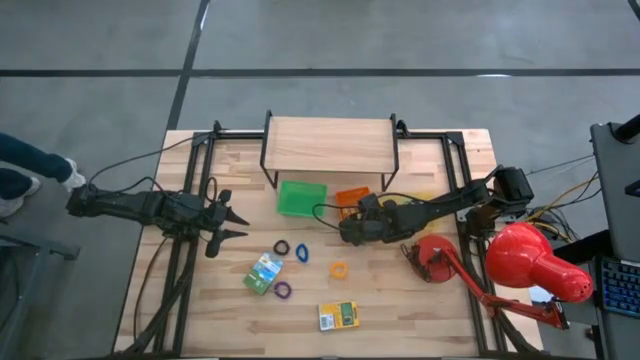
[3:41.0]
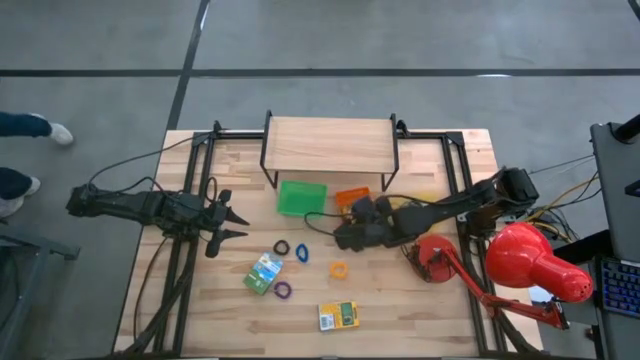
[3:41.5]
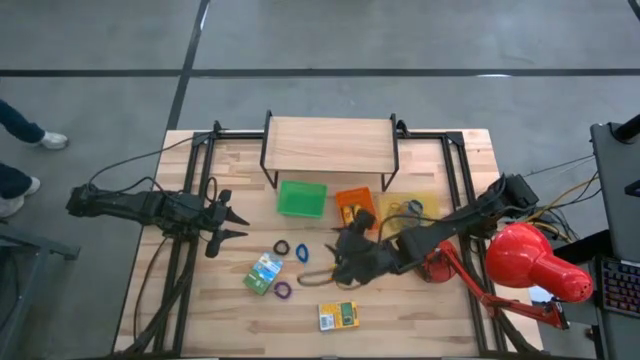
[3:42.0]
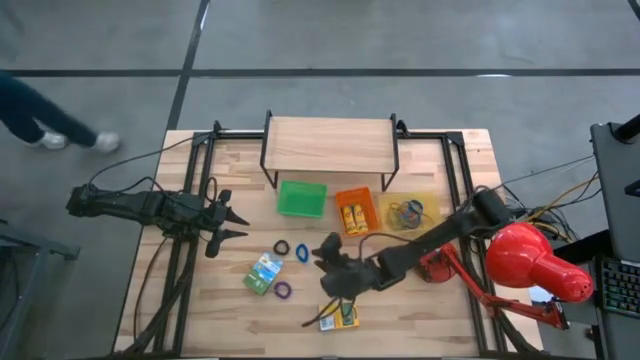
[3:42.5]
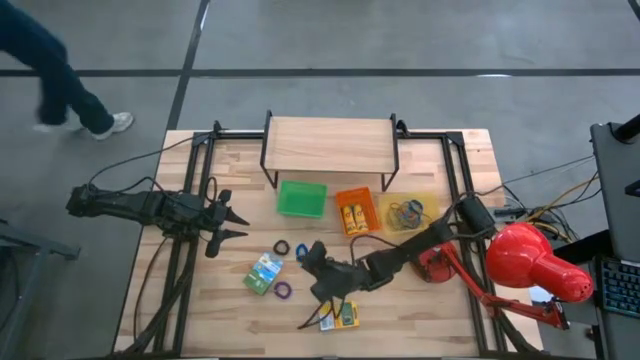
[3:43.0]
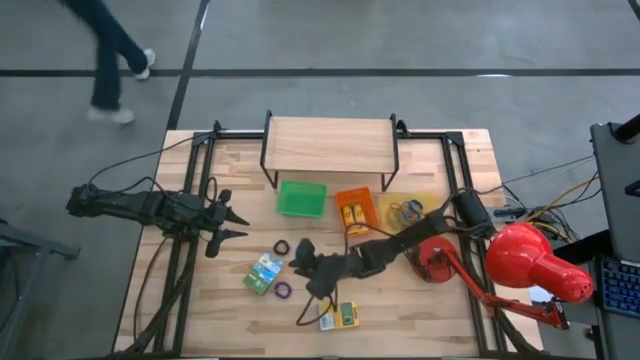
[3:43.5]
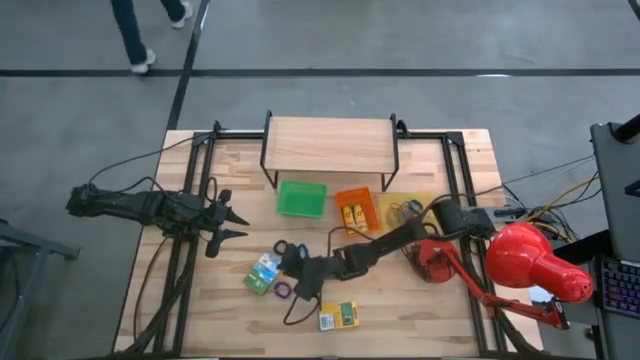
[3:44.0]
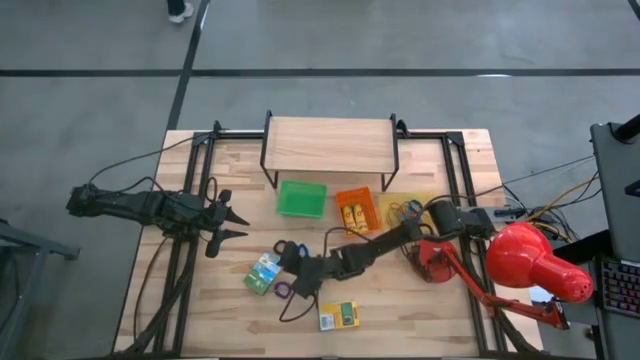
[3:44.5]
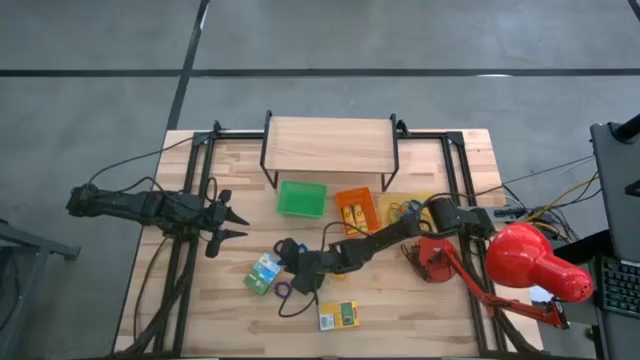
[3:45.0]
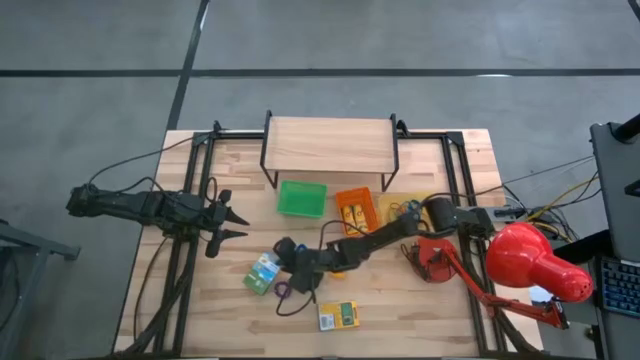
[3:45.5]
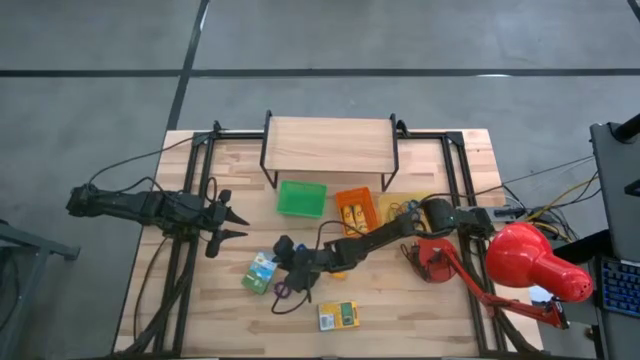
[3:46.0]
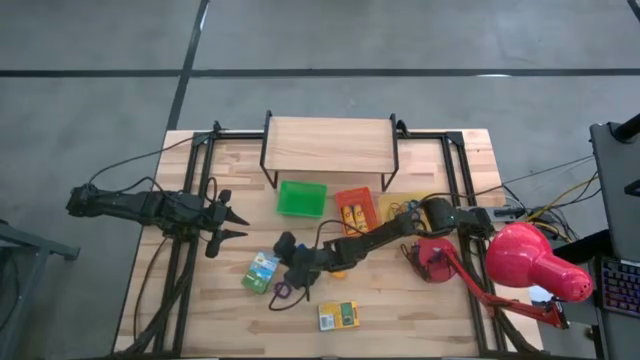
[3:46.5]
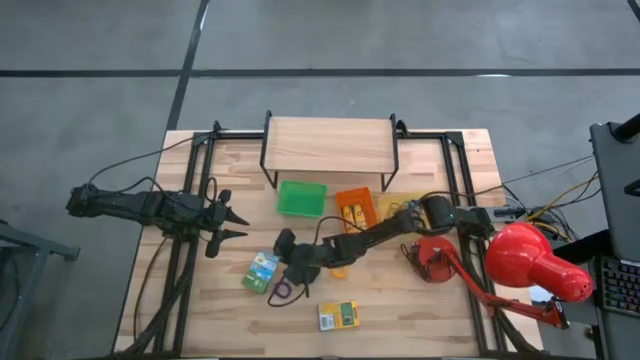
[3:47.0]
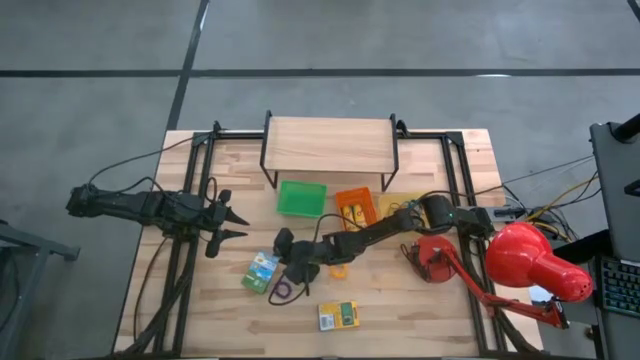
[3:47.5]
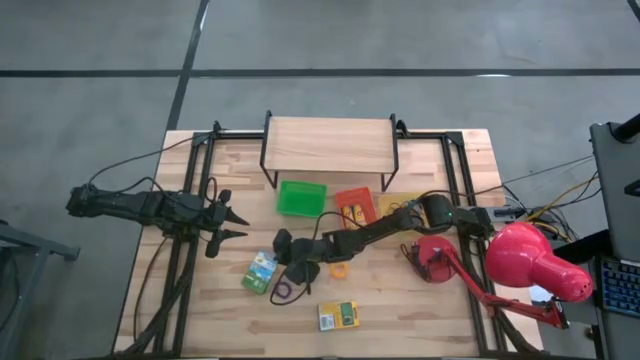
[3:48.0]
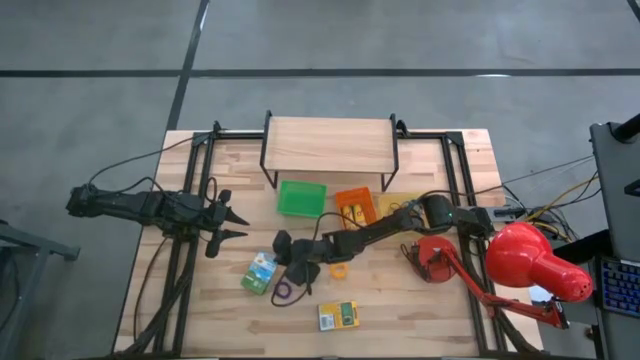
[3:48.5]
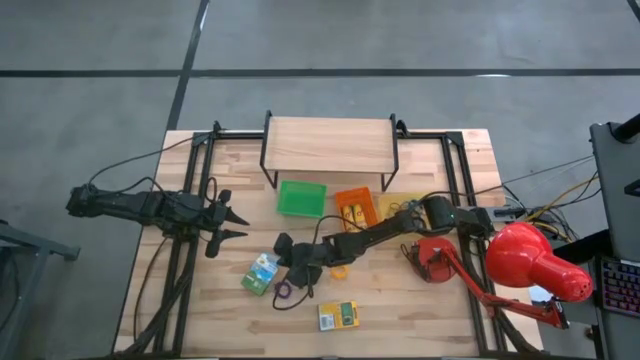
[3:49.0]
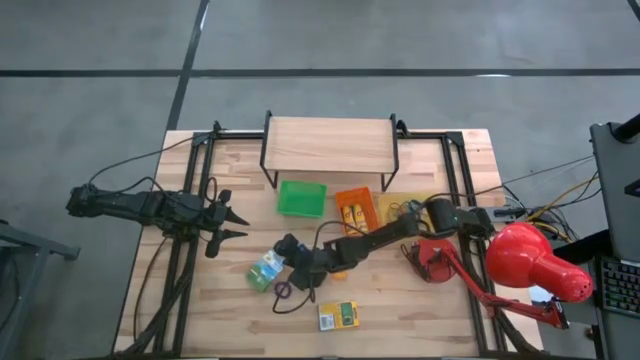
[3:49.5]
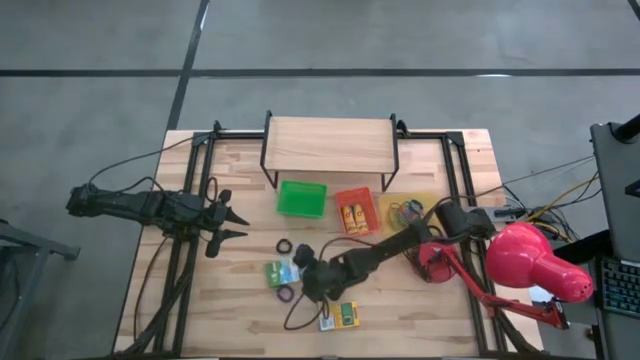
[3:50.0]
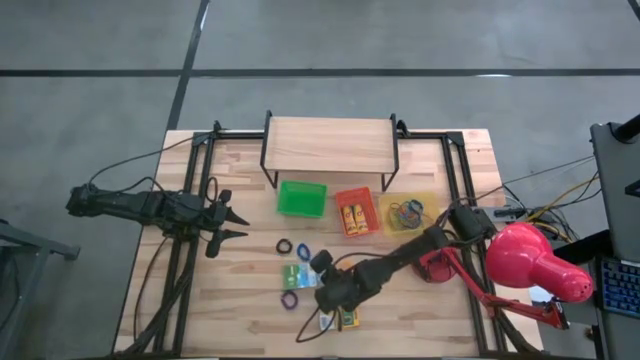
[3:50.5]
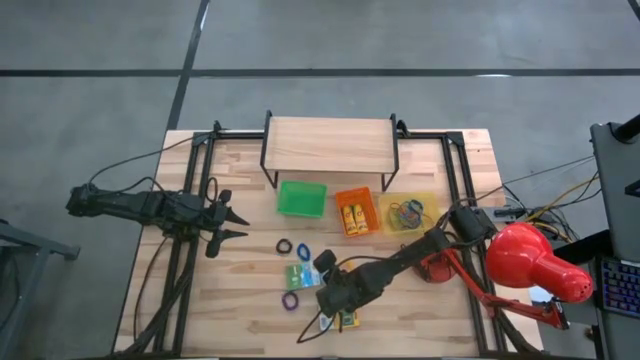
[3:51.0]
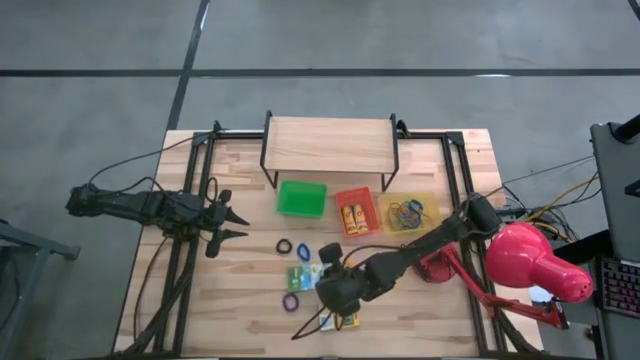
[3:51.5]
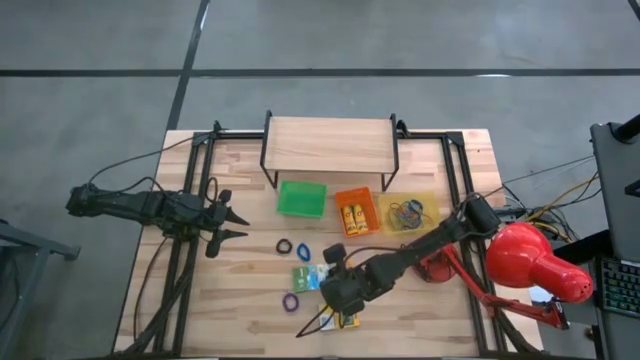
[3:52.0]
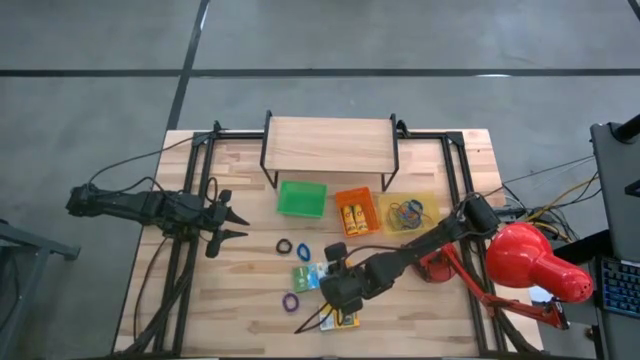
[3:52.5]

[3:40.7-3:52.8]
Task: Pick & Place Office Desk Supplies
Put the top large crayon box into the orange bin

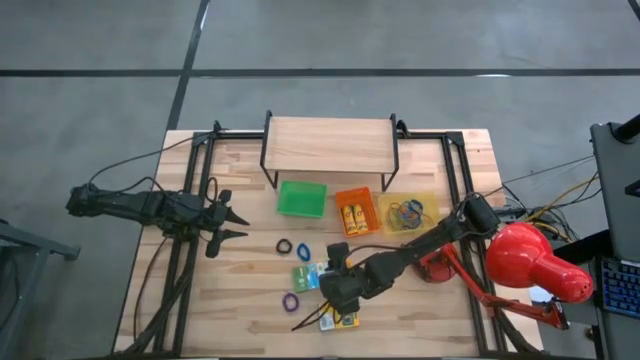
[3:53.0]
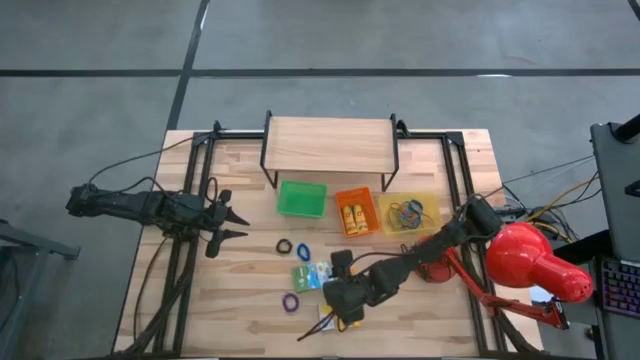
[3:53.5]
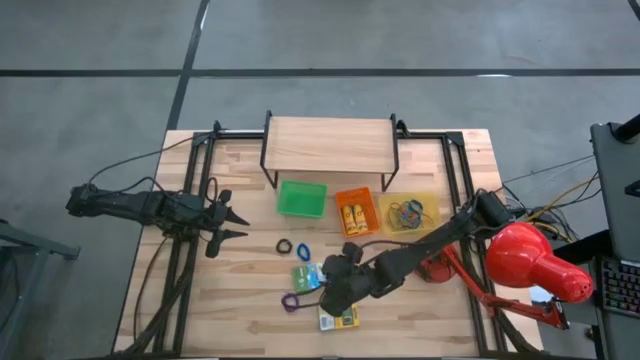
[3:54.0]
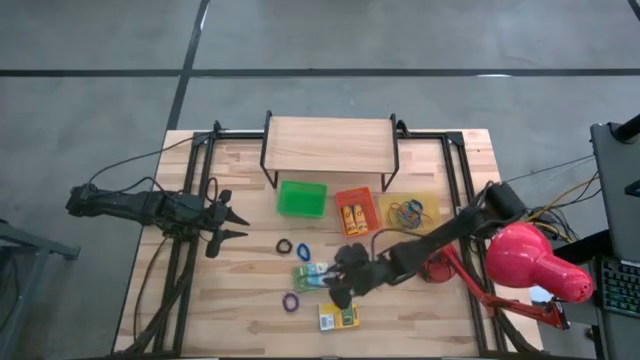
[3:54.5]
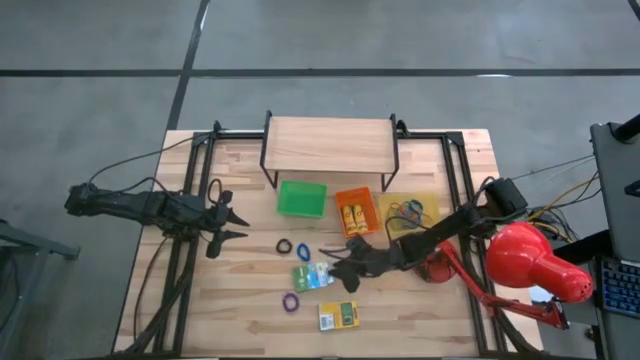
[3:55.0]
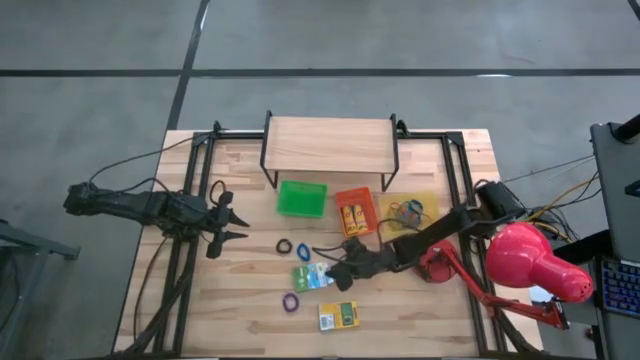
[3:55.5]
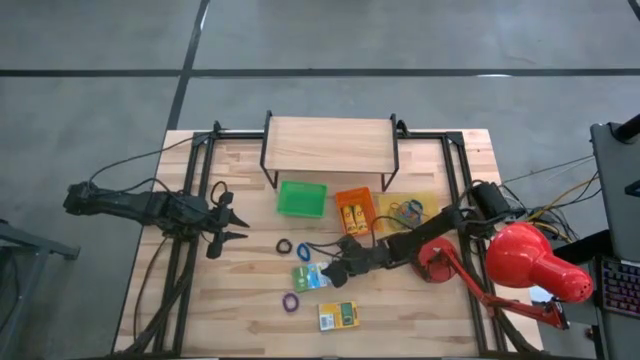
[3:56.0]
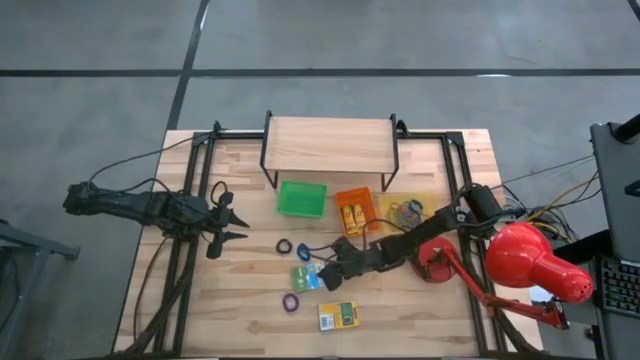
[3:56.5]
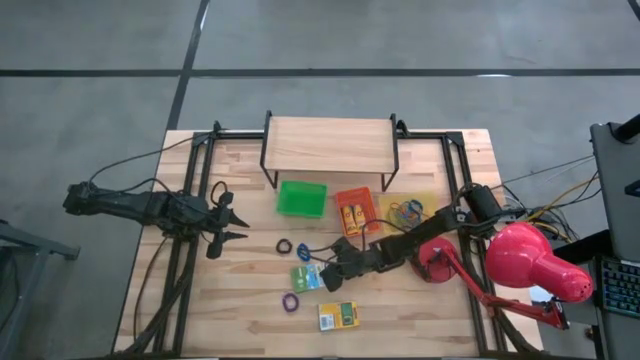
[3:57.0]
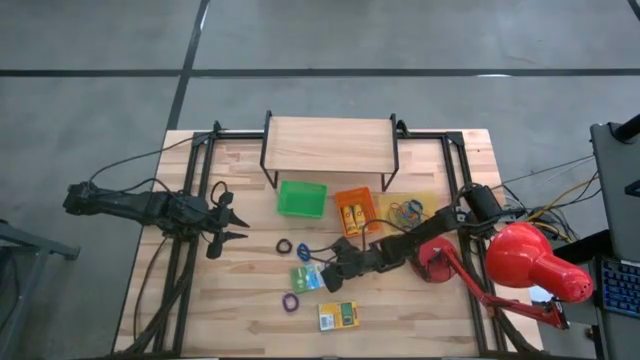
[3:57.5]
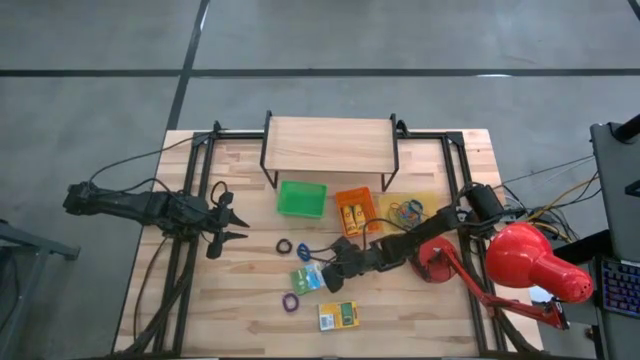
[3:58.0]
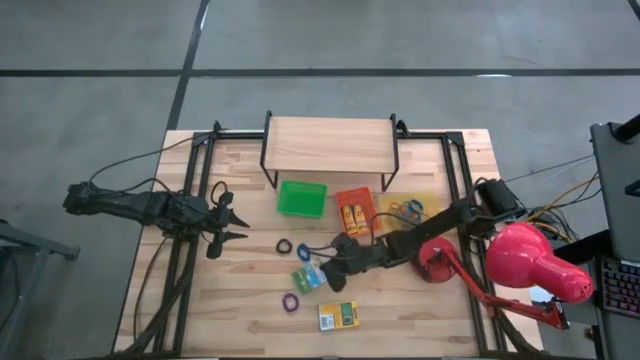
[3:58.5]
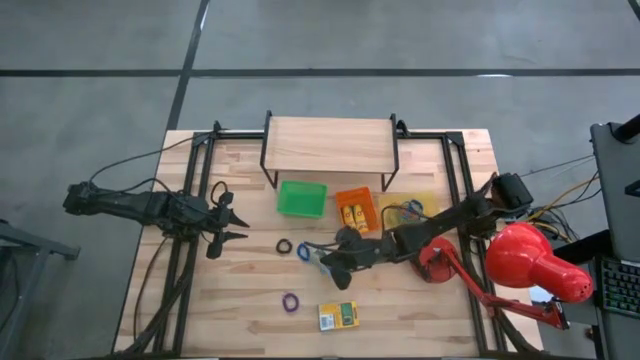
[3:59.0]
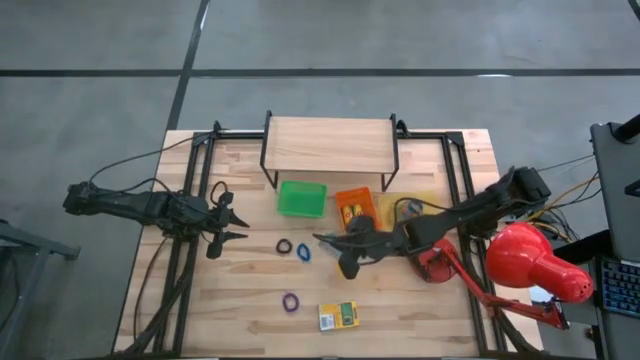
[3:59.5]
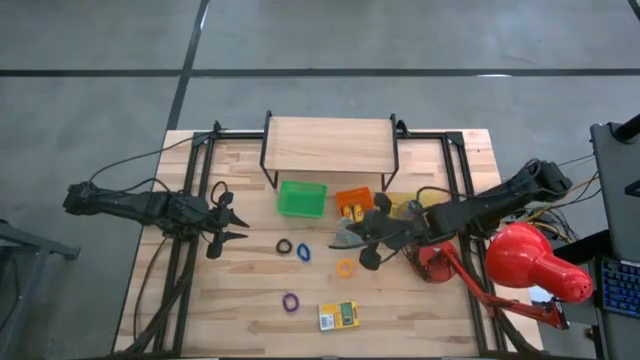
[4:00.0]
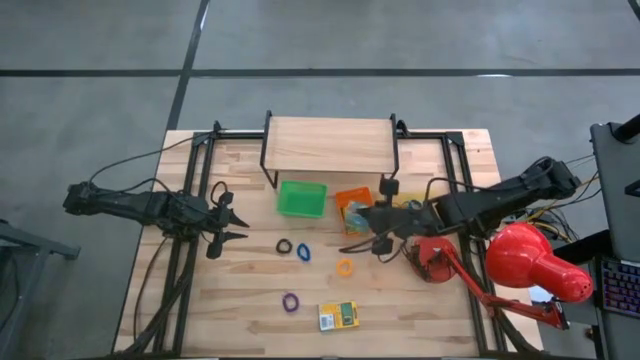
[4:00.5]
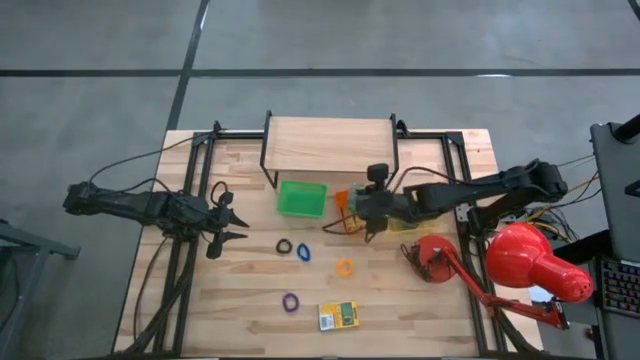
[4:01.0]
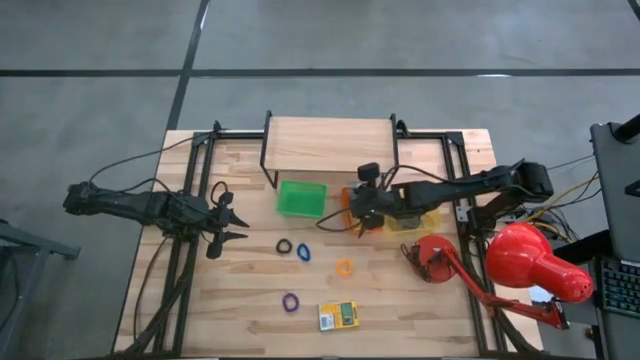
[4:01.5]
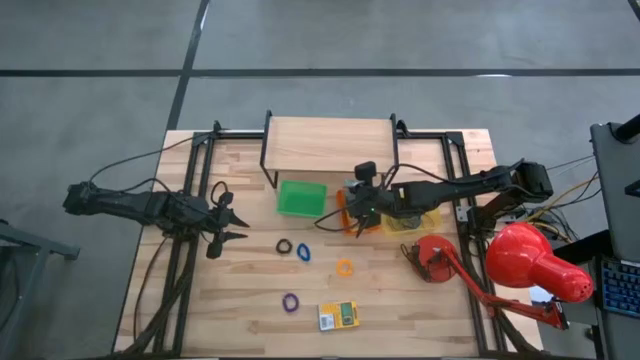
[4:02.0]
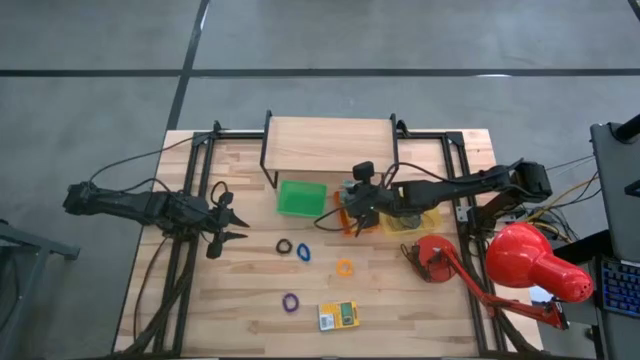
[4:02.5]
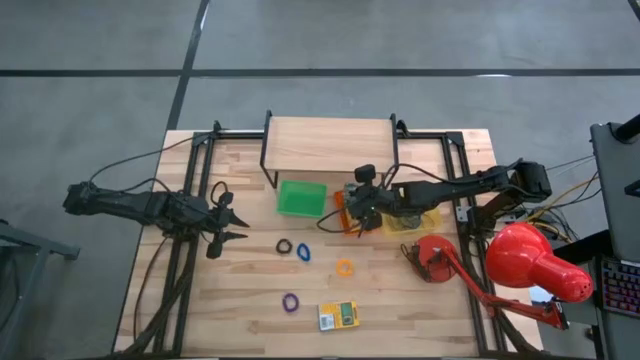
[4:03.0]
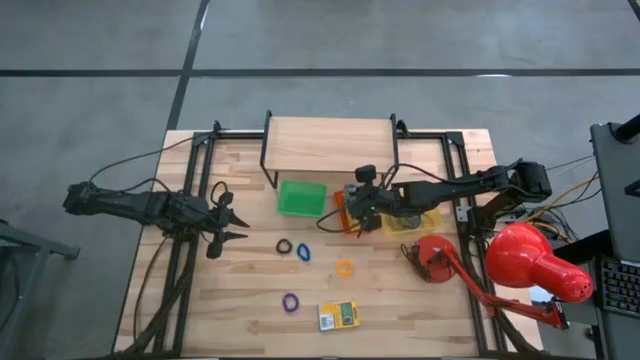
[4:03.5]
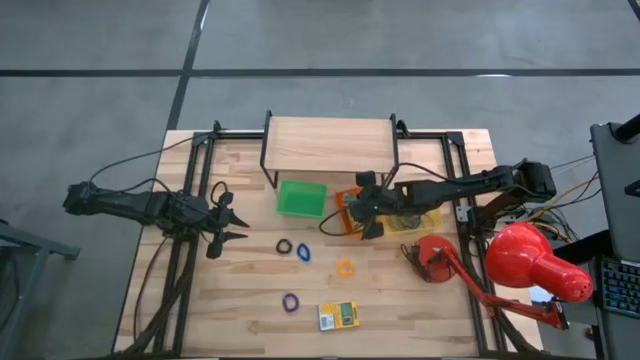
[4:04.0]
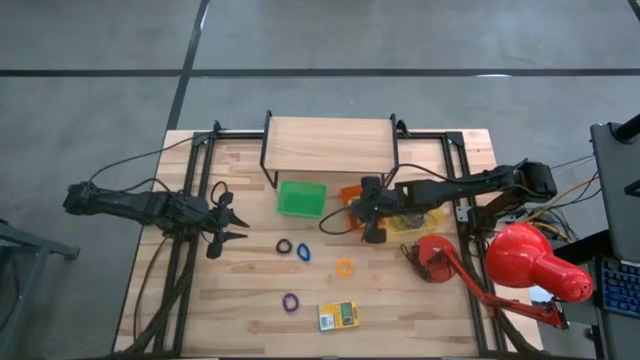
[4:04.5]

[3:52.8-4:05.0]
Put the top large crayon box into the orange bin
